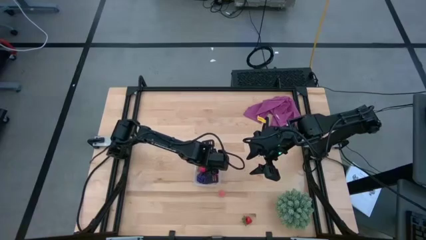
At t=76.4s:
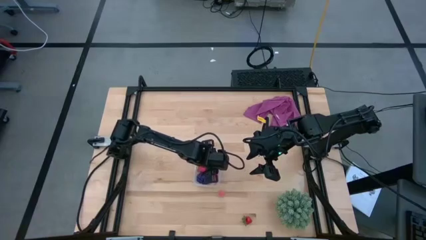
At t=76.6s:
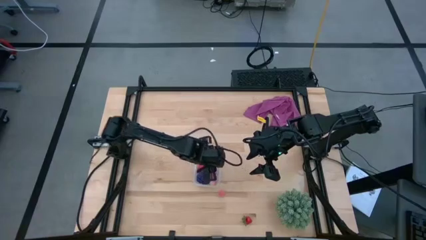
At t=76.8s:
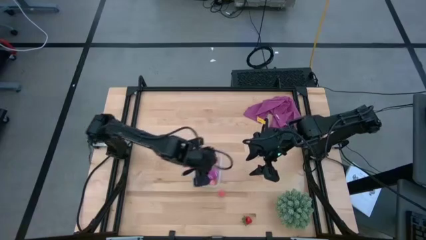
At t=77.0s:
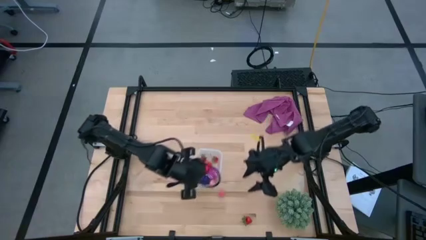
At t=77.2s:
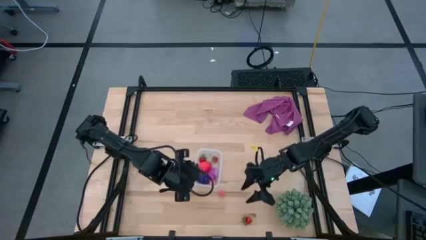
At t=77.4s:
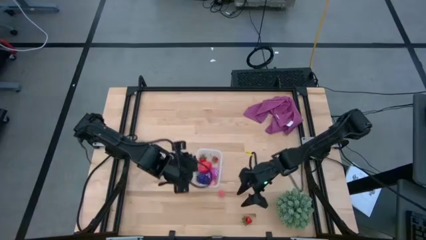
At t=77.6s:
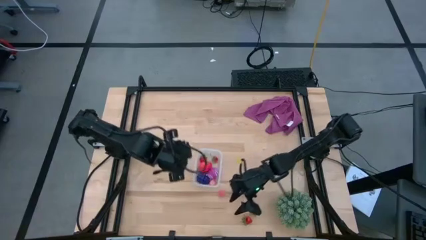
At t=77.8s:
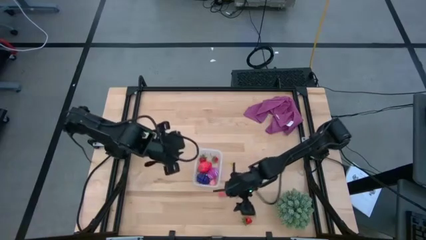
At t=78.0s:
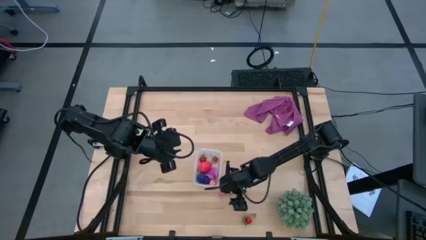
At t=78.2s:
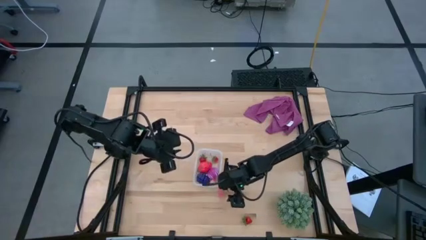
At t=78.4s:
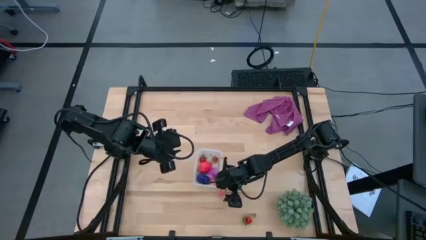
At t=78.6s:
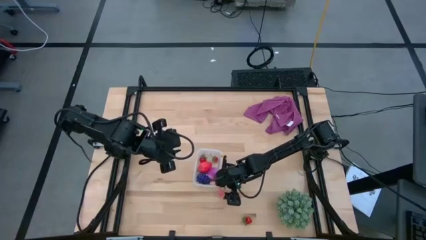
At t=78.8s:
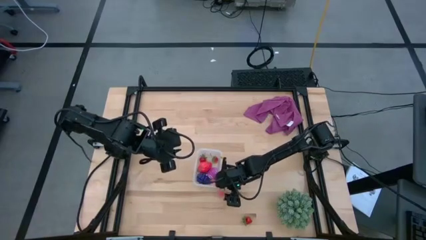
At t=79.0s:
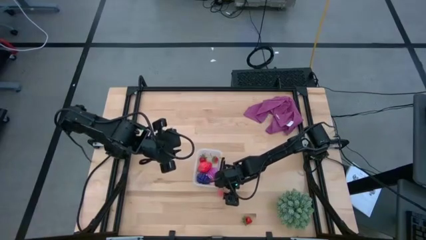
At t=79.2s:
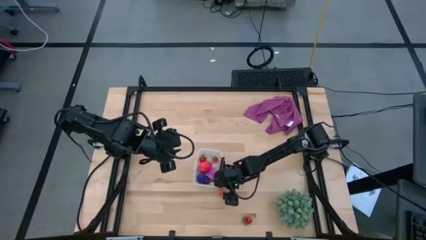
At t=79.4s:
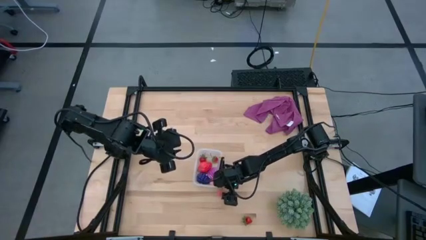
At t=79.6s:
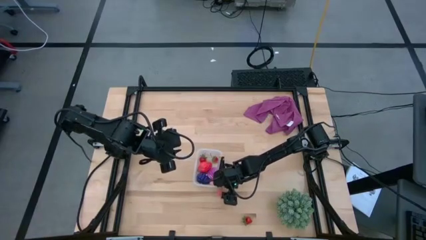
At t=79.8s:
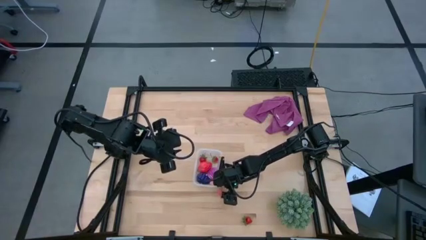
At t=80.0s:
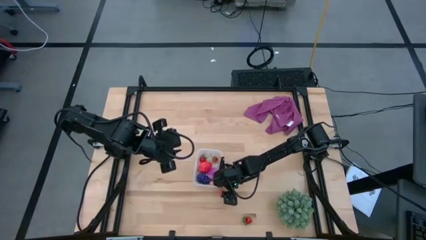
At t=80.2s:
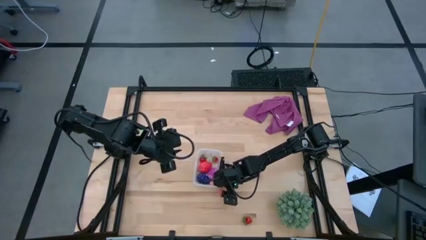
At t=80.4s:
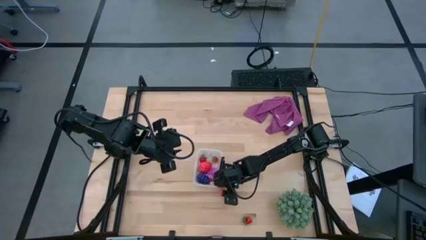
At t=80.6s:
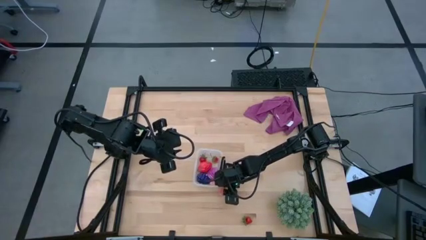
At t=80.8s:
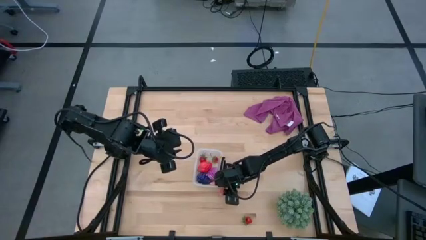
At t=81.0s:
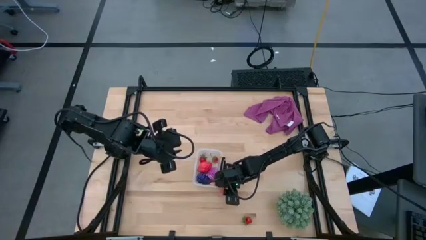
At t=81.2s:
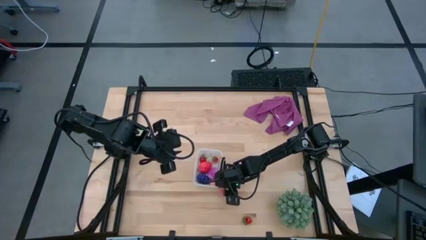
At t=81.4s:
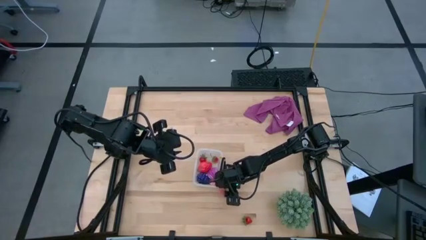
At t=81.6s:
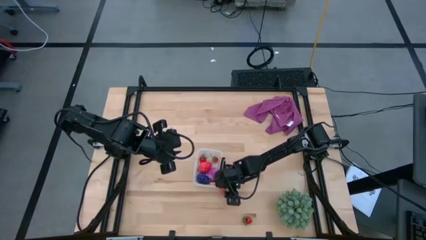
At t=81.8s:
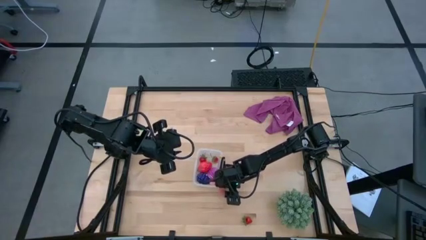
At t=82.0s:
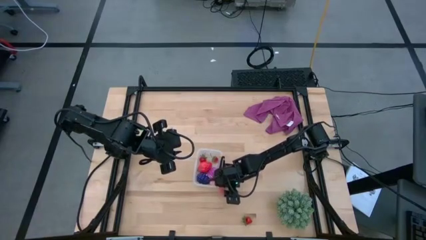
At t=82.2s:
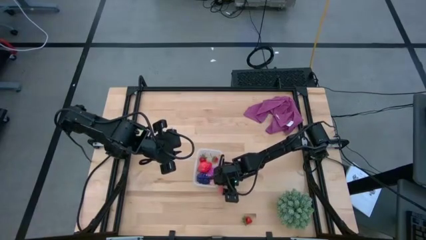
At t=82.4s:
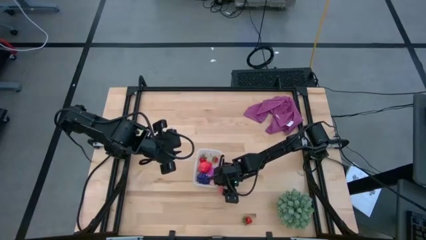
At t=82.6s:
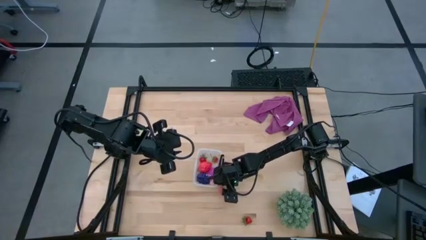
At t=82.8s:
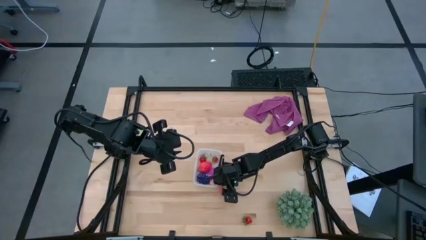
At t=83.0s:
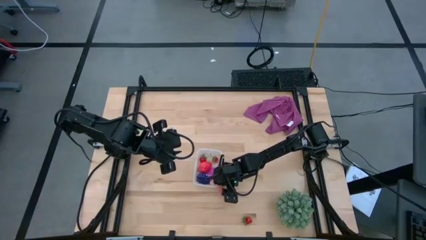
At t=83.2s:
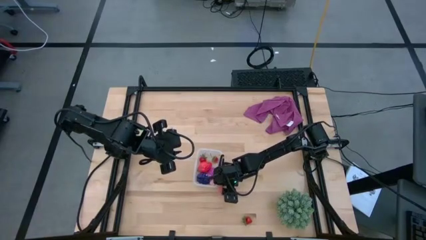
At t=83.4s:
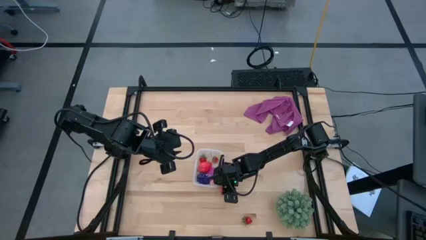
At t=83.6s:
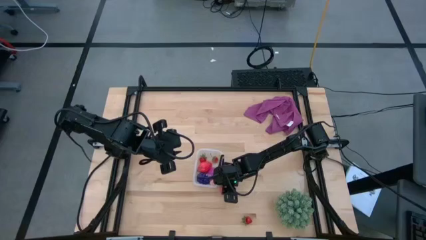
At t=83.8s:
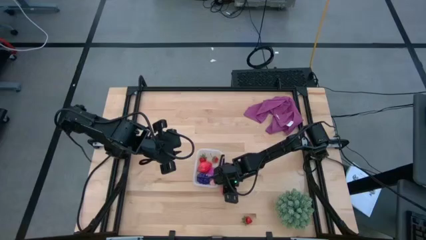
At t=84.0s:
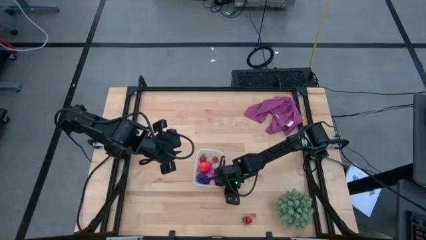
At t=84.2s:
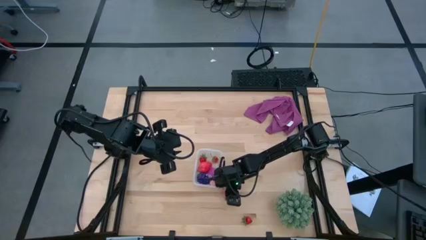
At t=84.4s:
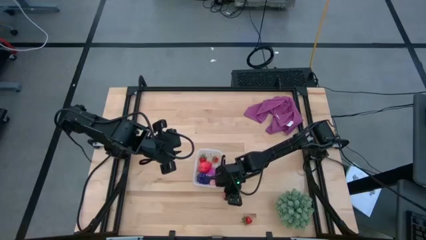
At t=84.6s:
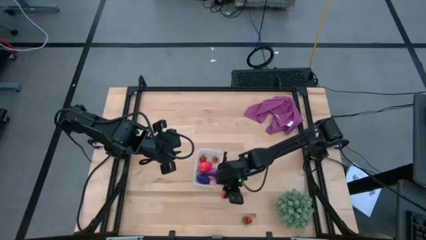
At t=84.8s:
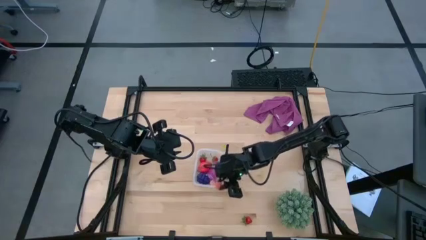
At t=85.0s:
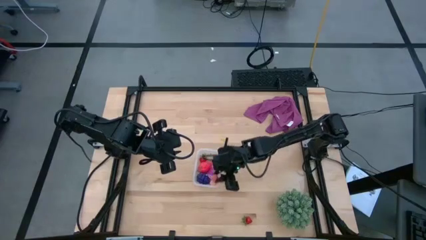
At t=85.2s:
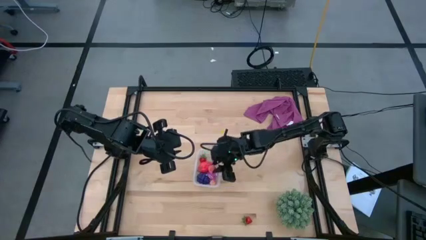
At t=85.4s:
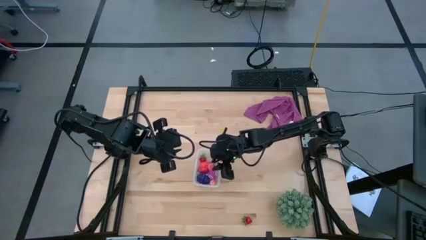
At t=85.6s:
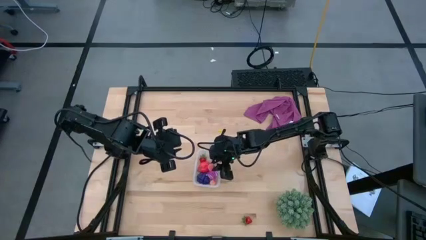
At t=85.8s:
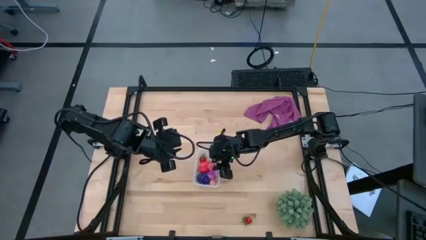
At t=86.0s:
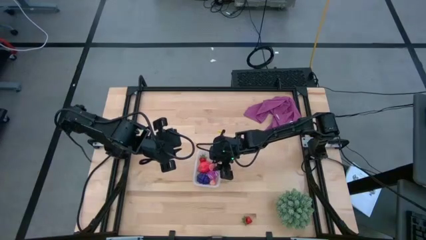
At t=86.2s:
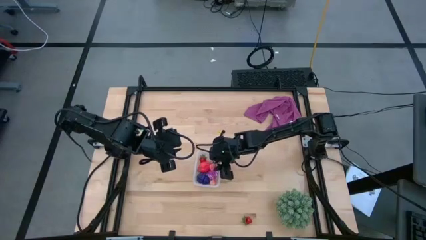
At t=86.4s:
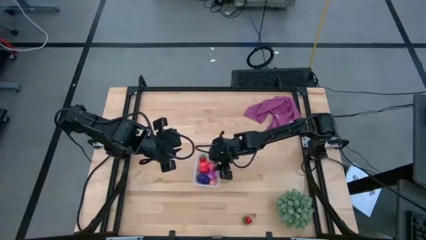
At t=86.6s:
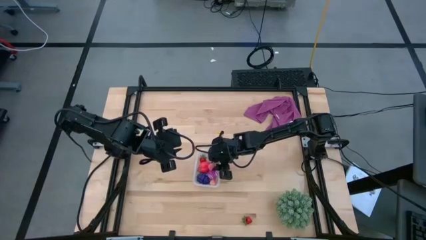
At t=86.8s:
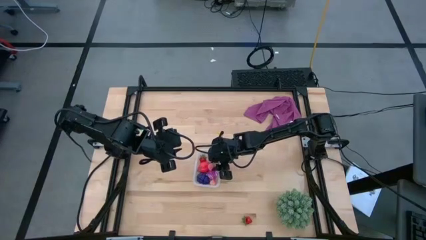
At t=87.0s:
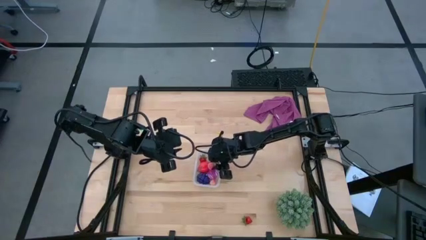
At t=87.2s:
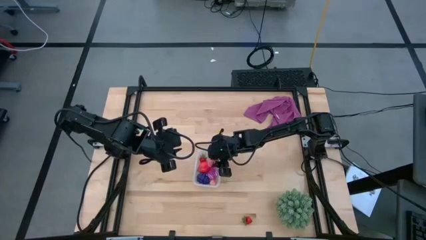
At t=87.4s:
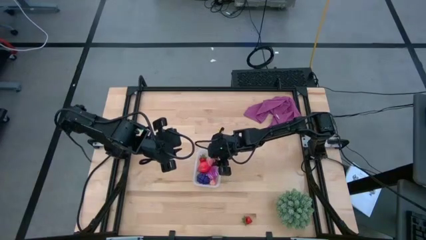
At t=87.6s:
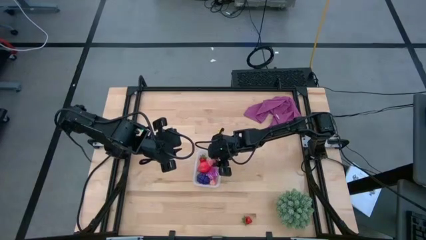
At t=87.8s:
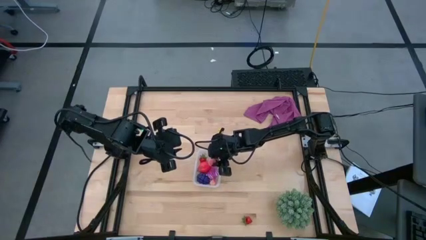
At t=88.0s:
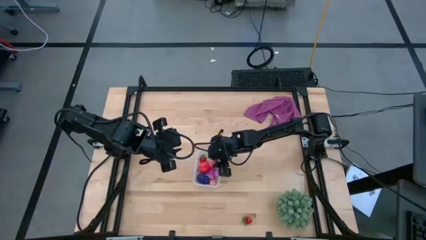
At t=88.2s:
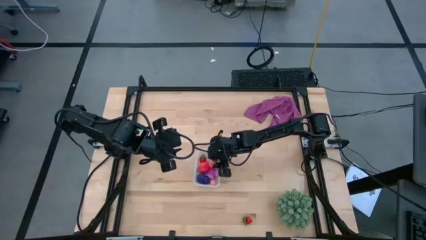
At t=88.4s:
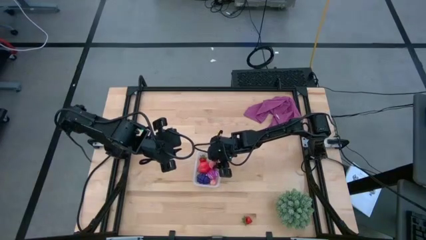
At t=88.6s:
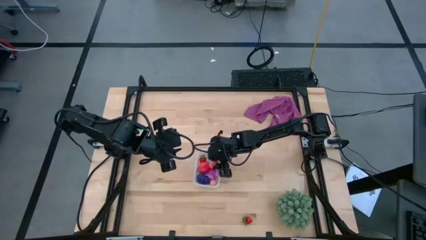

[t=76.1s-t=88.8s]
Task: Pick and placing Produce into tupperware
Put the light orange peach into the transparent bin
